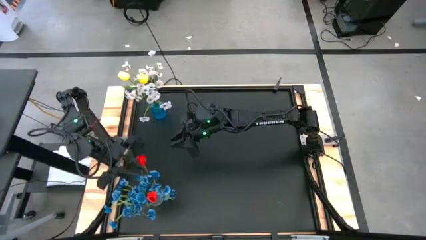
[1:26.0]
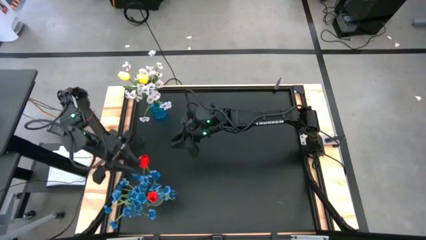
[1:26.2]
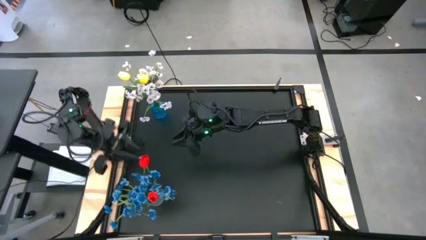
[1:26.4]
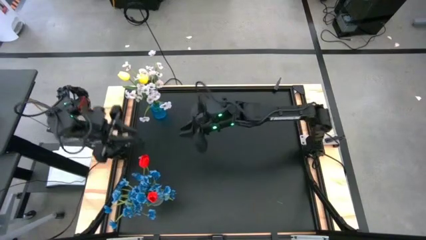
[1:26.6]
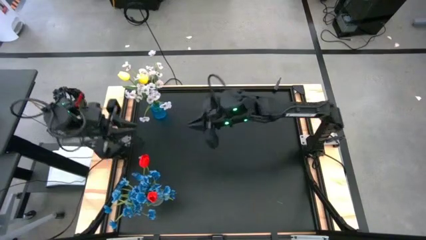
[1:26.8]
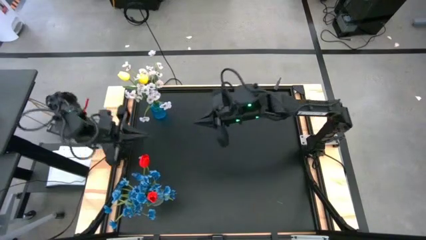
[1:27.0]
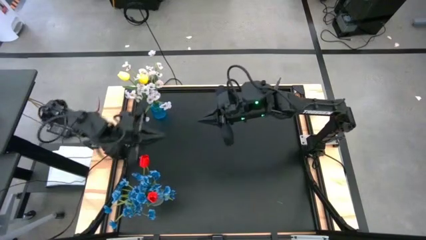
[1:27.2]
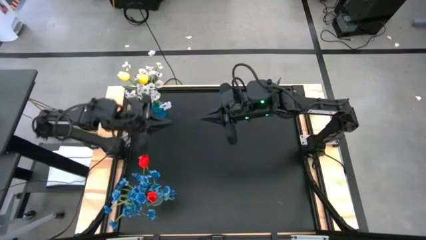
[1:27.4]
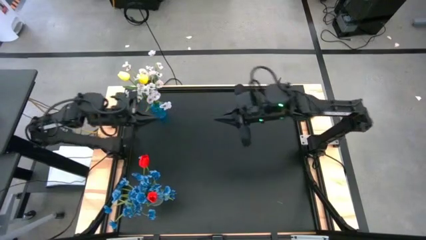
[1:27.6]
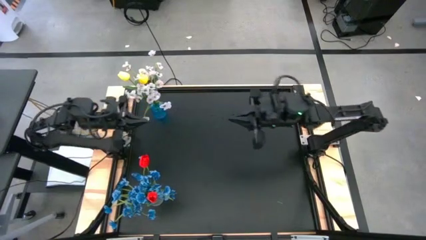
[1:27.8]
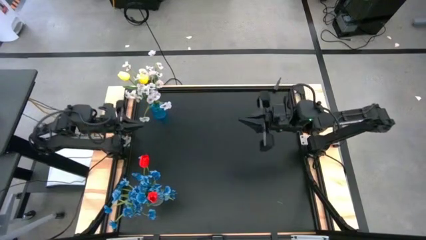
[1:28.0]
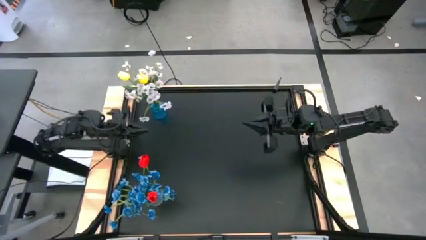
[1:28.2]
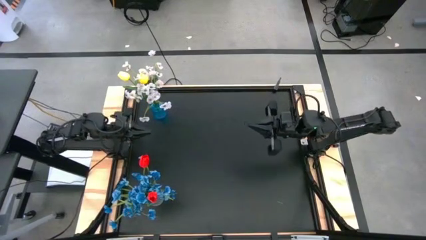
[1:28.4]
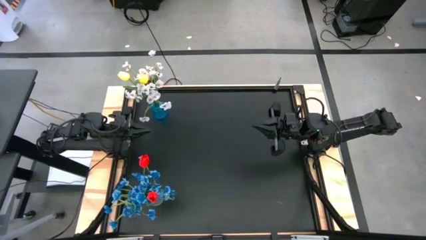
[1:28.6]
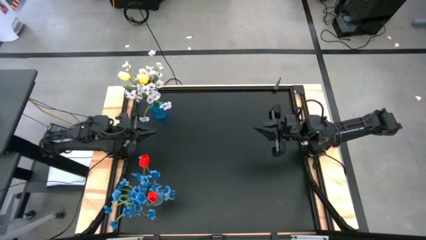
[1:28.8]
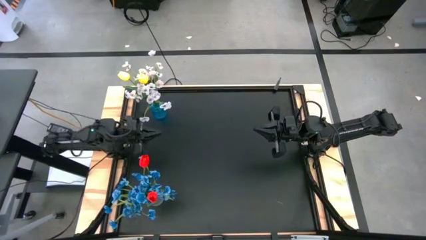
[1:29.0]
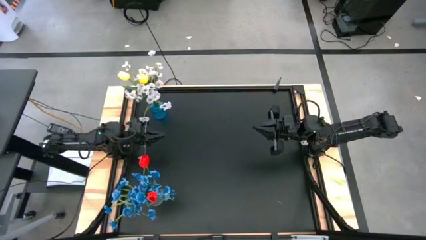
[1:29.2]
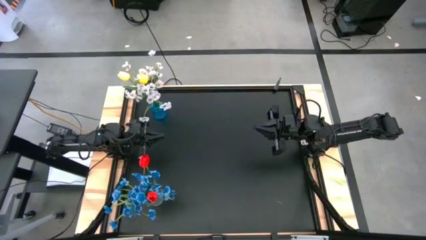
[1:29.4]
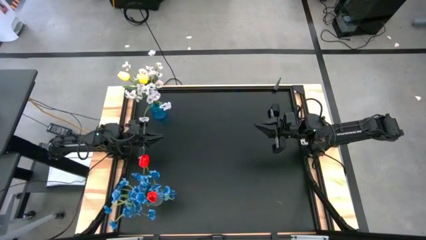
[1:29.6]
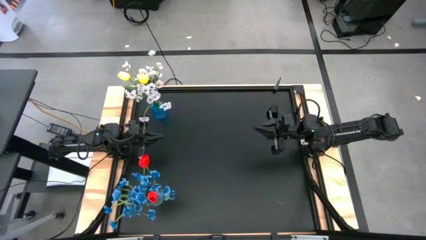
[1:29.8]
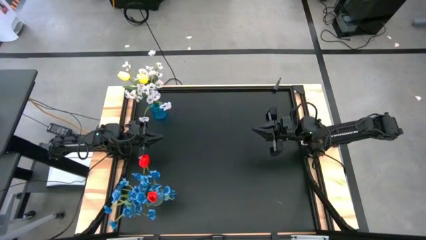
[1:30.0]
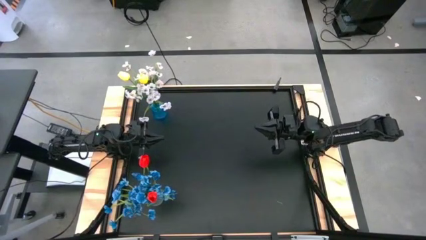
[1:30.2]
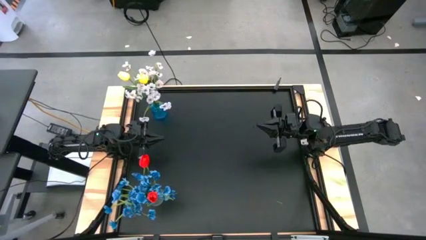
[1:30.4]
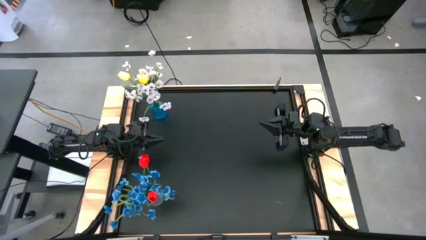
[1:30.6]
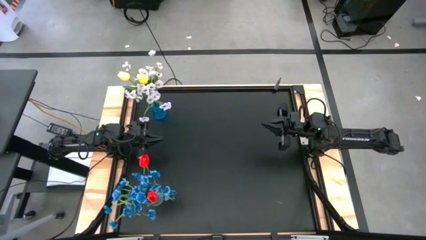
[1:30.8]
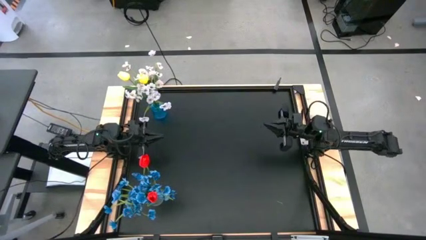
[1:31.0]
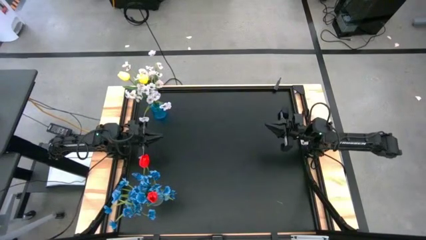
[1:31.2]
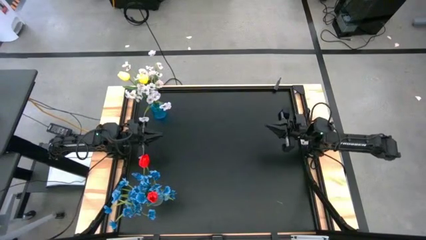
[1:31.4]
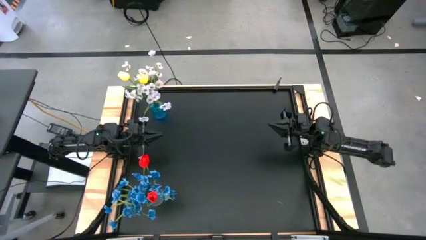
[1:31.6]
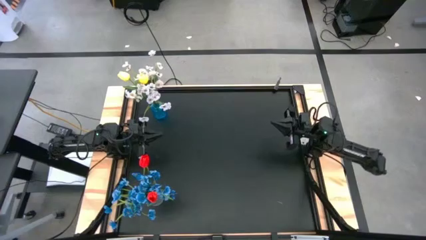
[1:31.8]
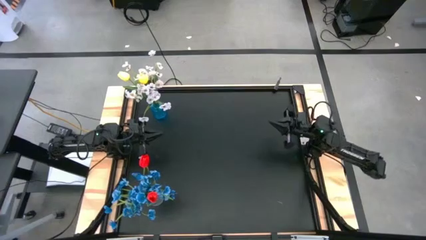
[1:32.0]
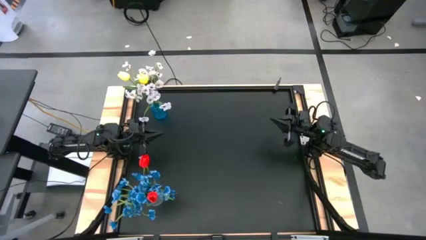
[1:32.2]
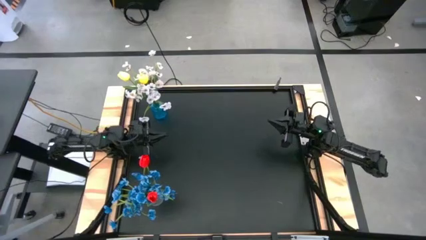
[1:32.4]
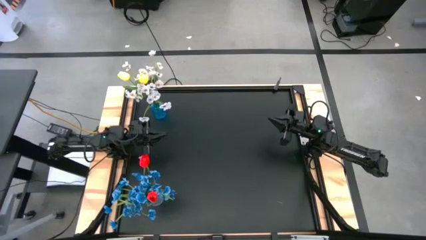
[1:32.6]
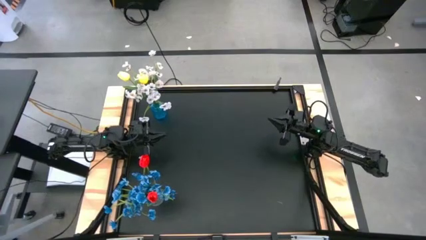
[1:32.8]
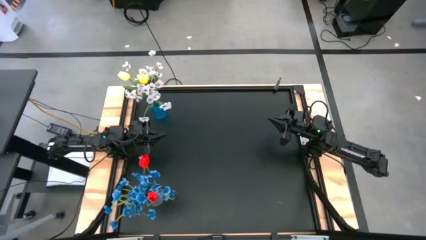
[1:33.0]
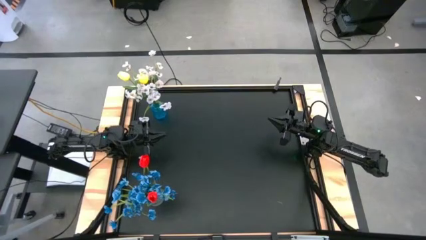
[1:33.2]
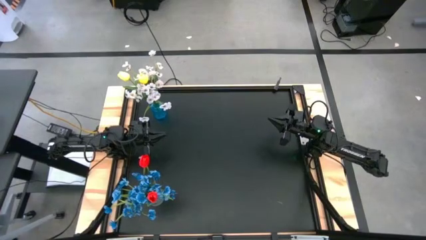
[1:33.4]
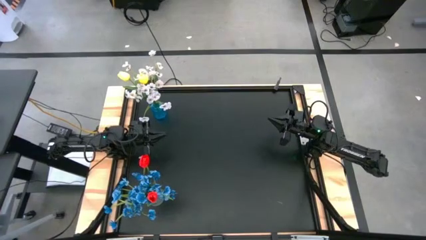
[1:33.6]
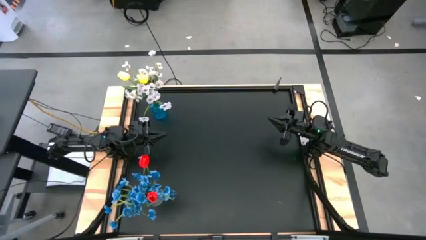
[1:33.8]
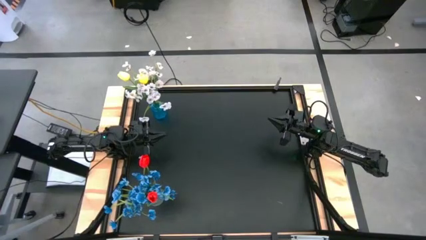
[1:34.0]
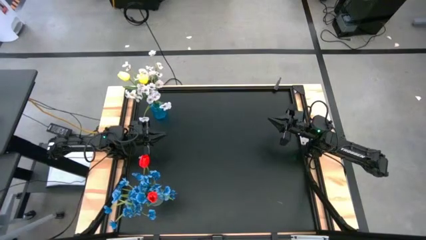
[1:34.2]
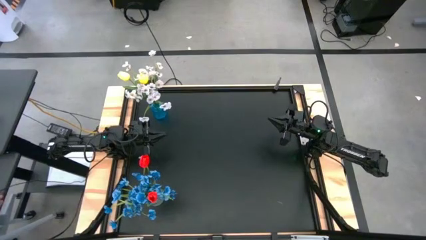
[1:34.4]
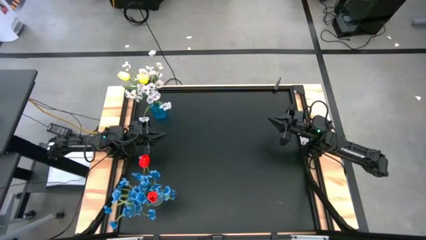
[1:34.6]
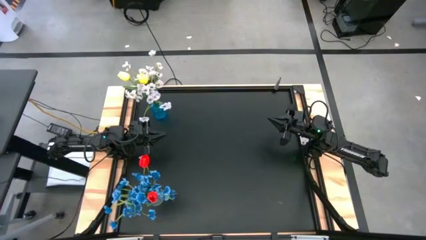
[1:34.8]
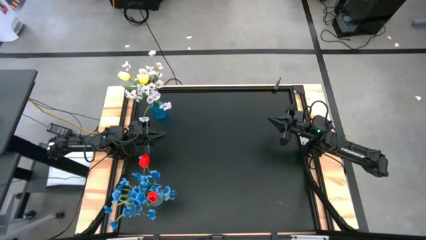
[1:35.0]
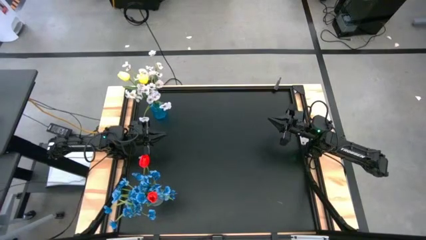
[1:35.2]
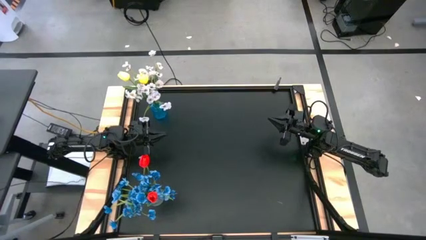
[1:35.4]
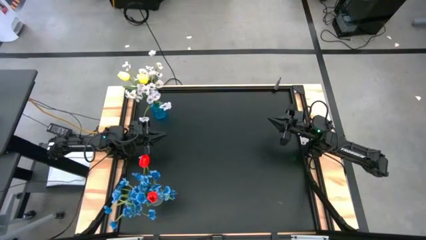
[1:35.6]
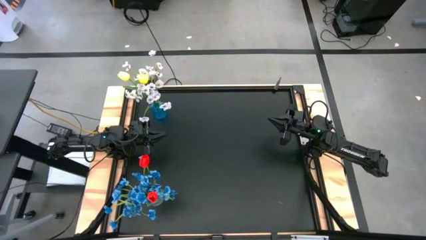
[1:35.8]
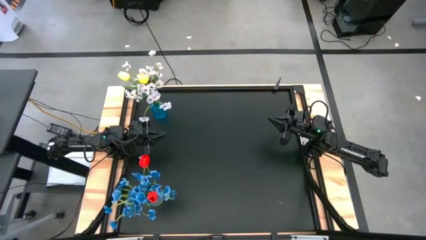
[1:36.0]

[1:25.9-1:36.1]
Task: Sort flowers into vase by color
Return to Home Position
